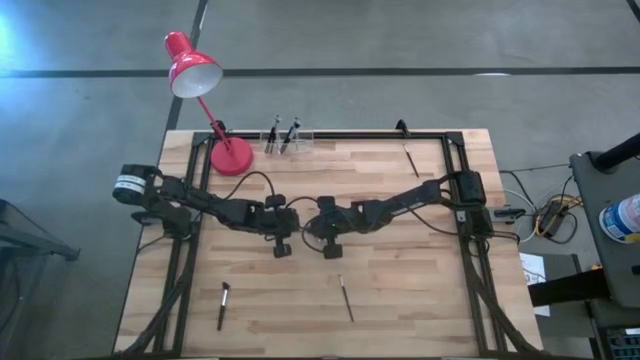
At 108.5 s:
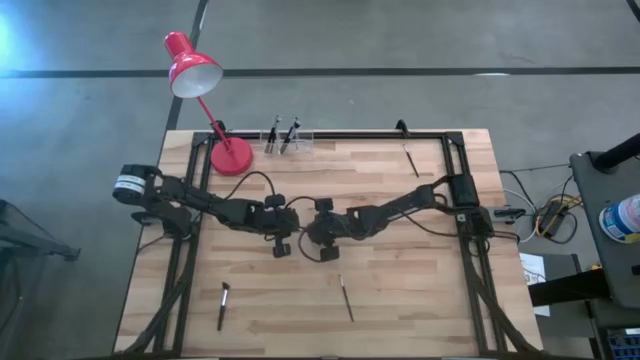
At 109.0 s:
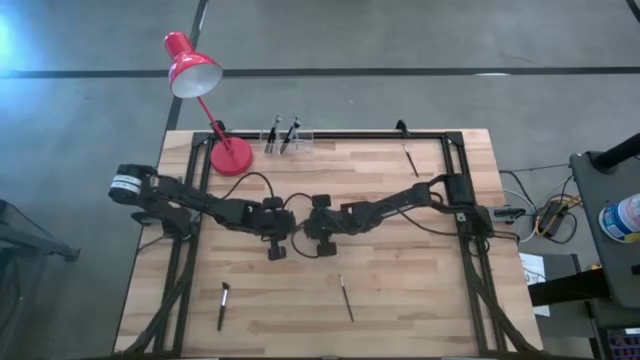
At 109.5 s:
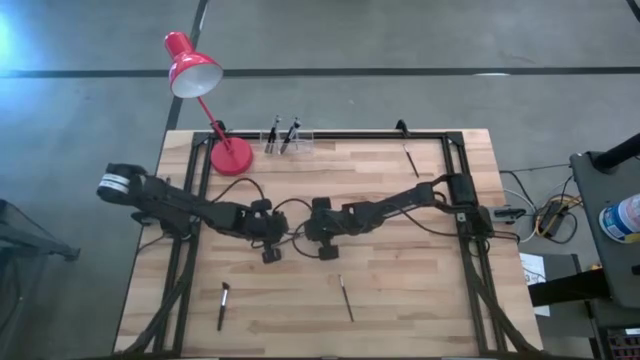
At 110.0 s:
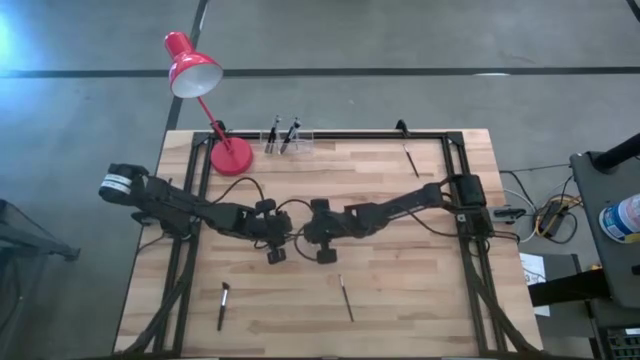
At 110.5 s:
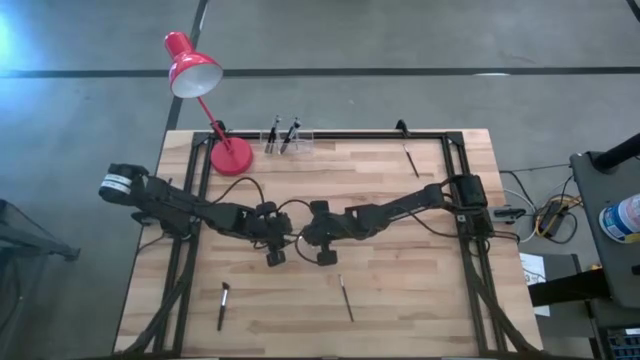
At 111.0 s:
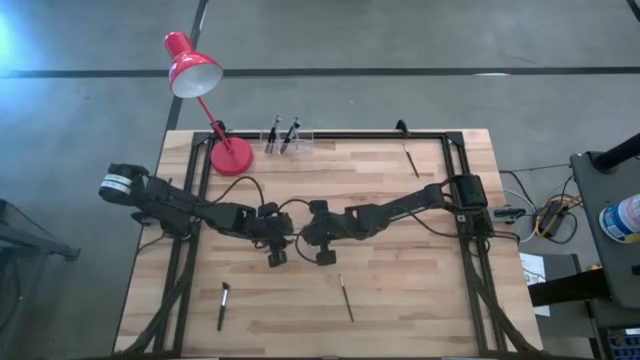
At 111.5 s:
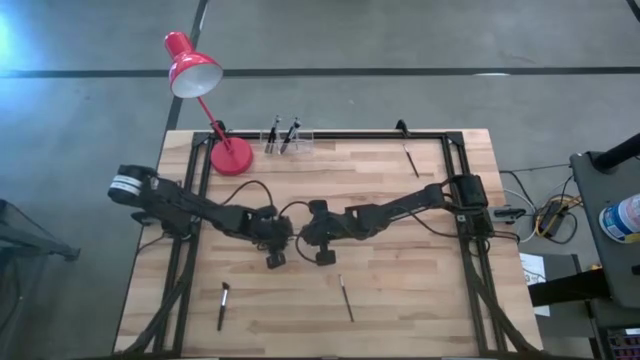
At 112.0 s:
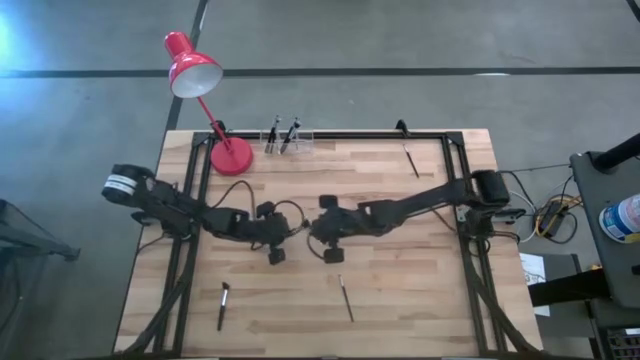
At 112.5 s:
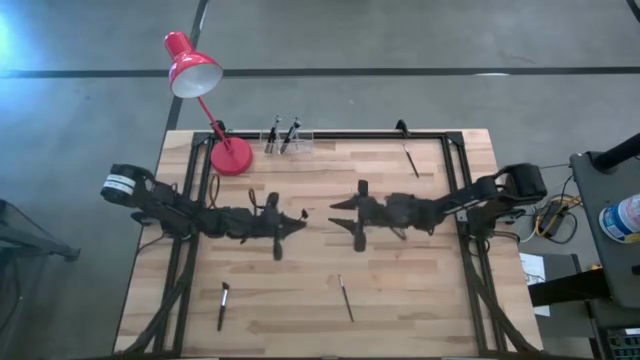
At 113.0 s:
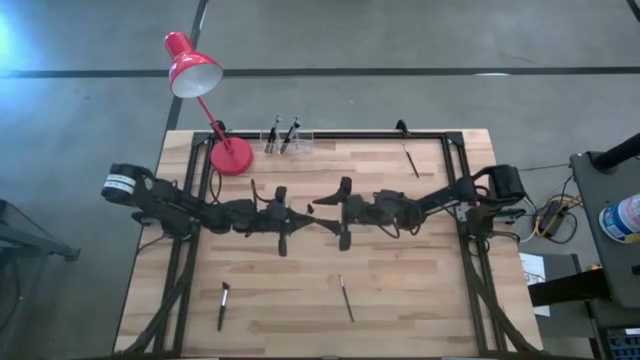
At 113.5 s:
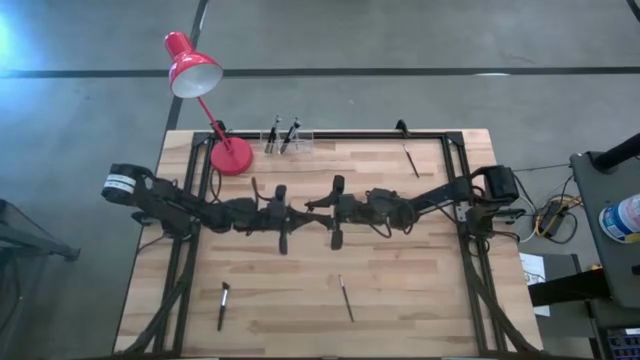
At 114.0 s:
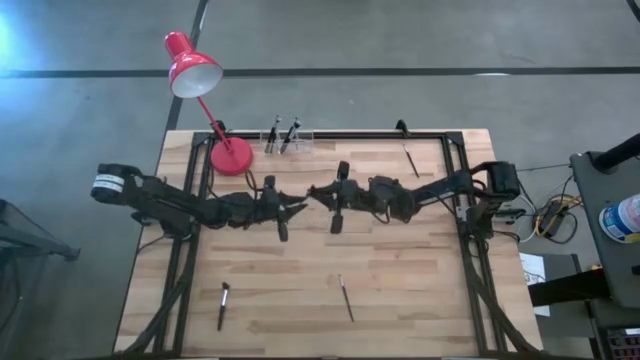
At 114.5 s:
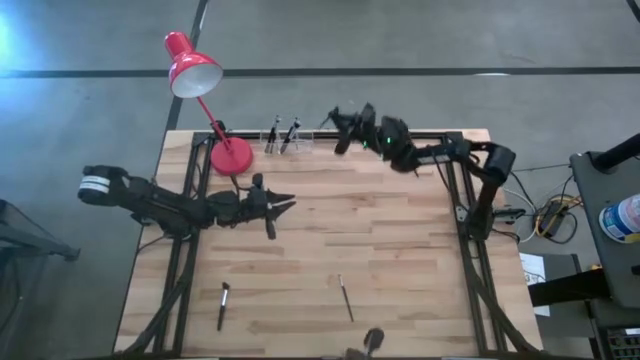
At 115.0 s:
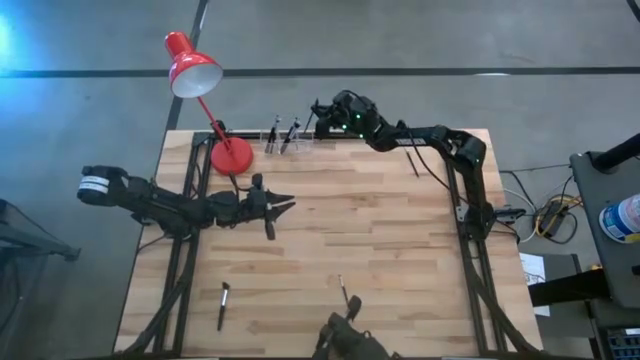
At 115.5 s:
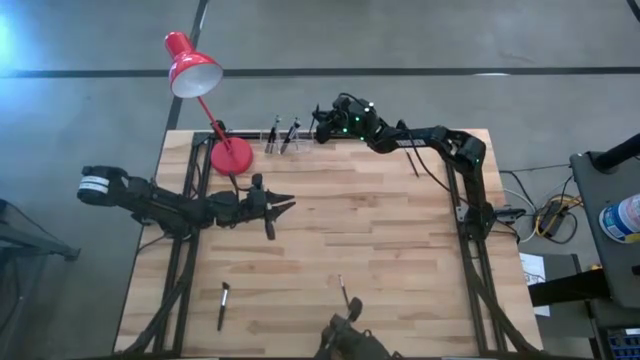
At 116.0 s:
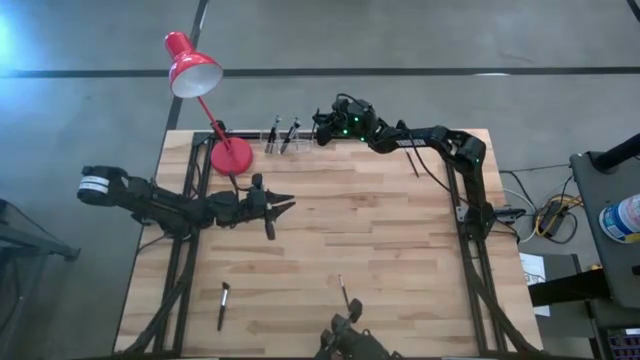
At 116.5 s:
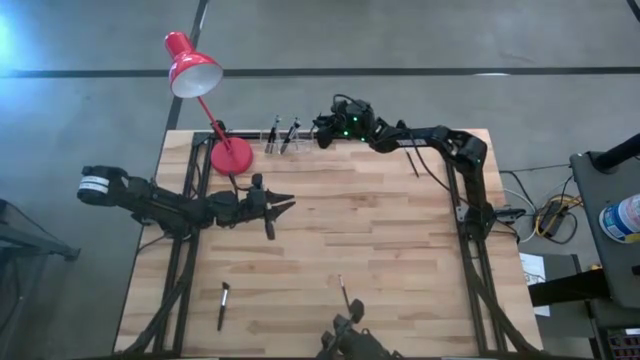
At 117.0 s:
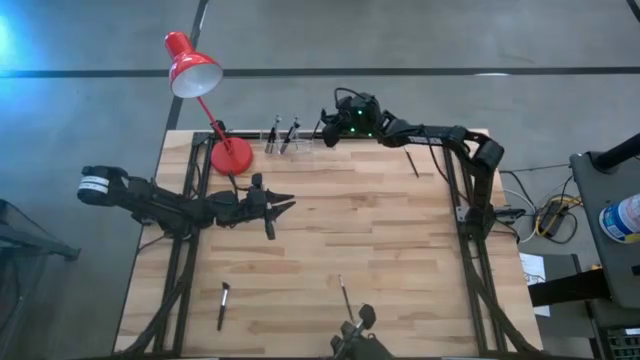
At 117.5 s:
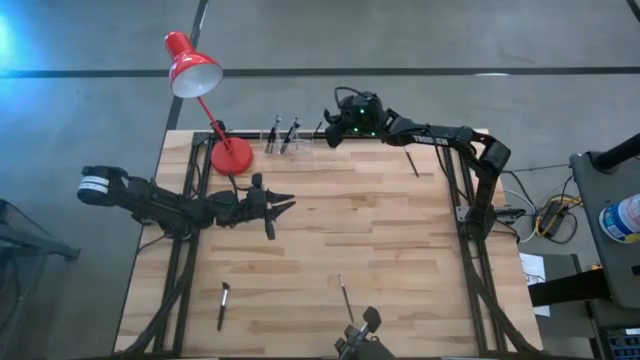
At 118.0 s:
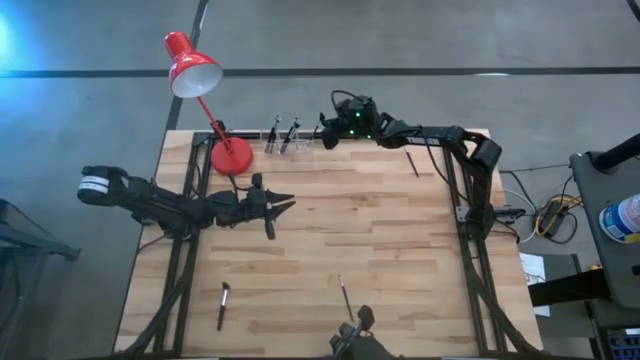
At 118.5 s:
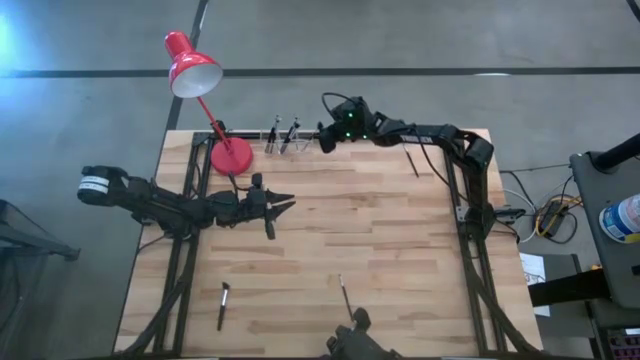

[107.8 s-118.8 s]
Task: Pick & Place Makeup Supplies
Put the makeup brush into the transparent organizer

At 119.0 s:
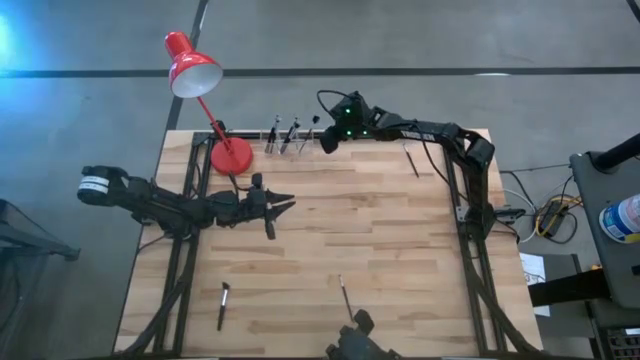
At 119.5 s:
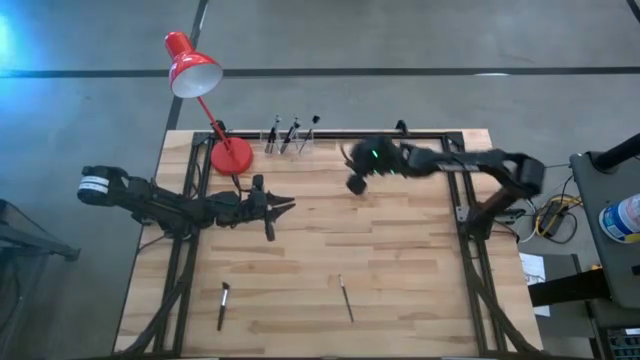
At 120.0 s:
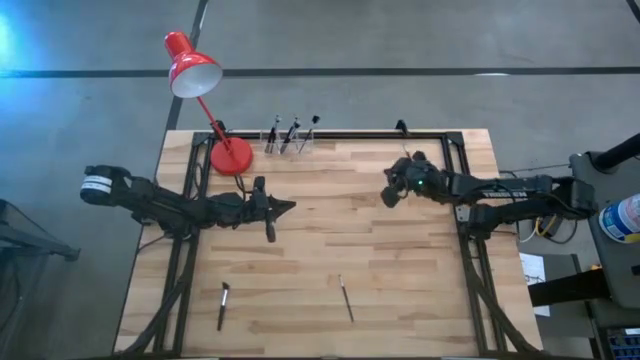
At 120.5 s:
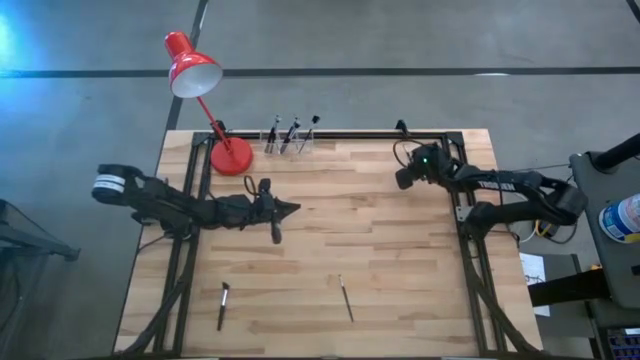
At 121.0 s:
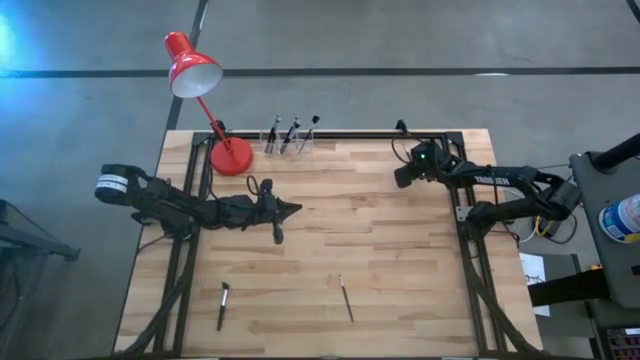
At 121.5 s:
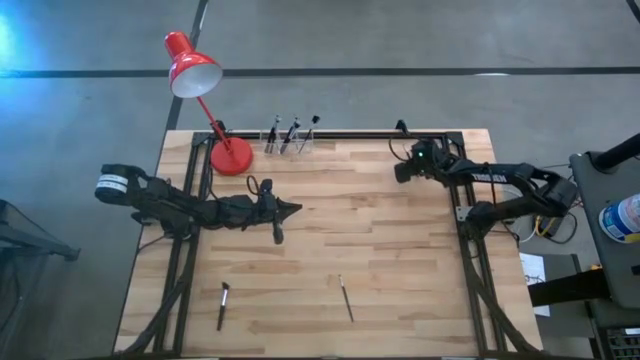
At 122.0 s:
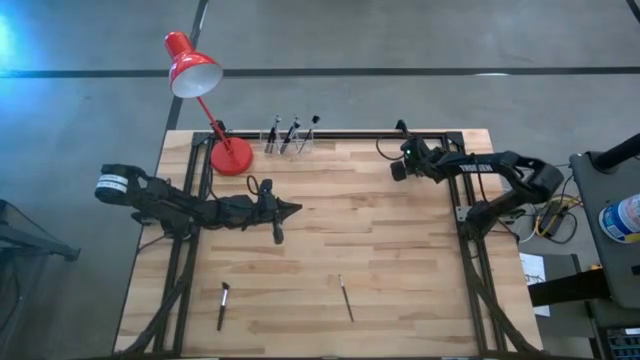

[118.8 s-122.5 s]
Put the makeup brush into the transparent organizer

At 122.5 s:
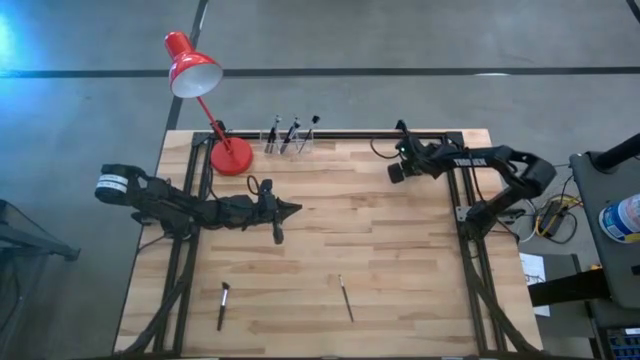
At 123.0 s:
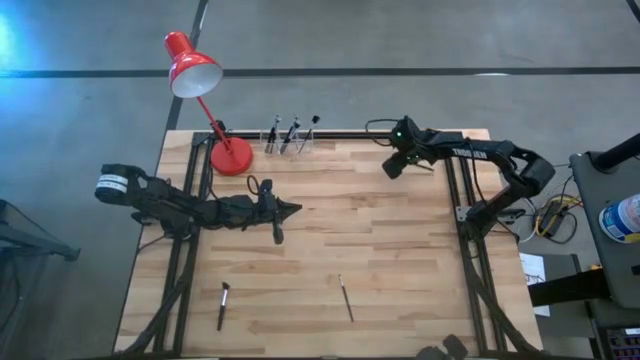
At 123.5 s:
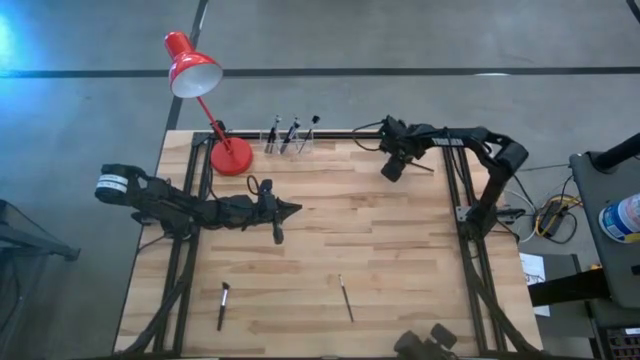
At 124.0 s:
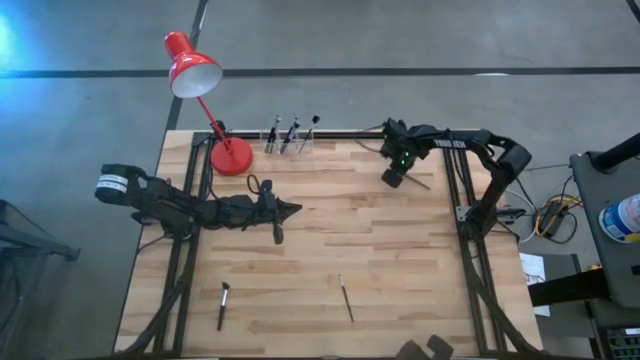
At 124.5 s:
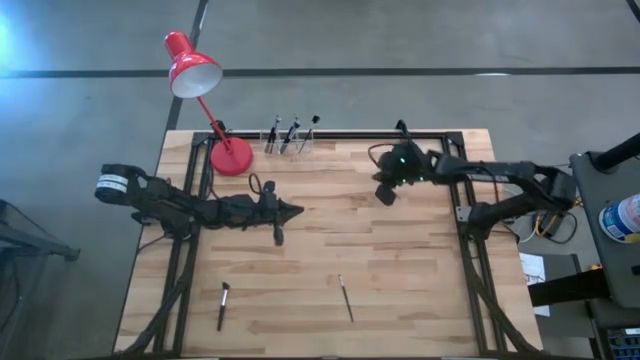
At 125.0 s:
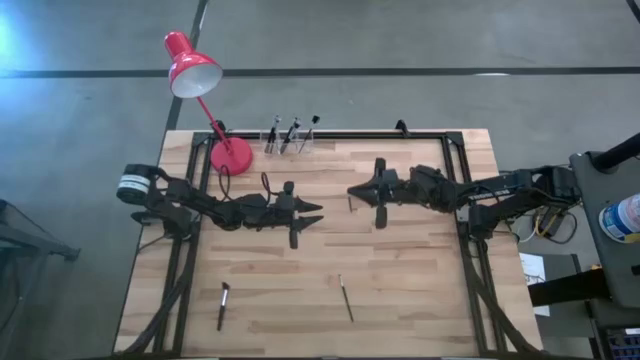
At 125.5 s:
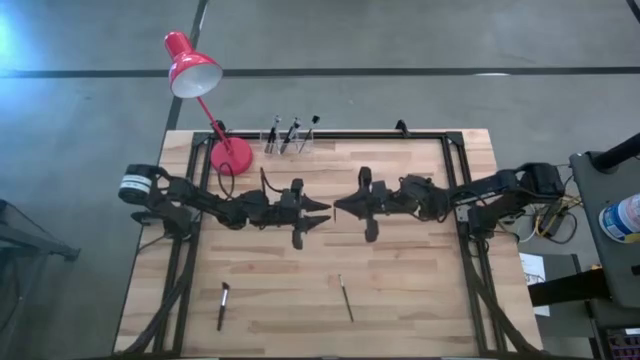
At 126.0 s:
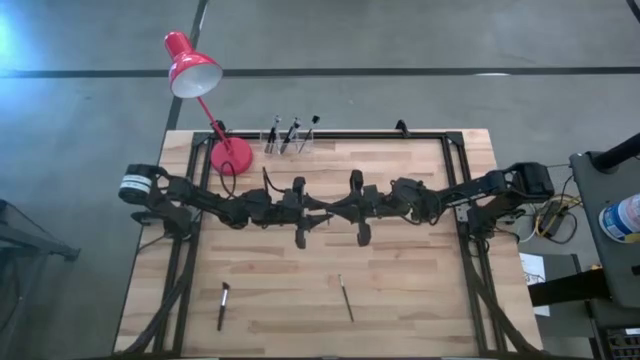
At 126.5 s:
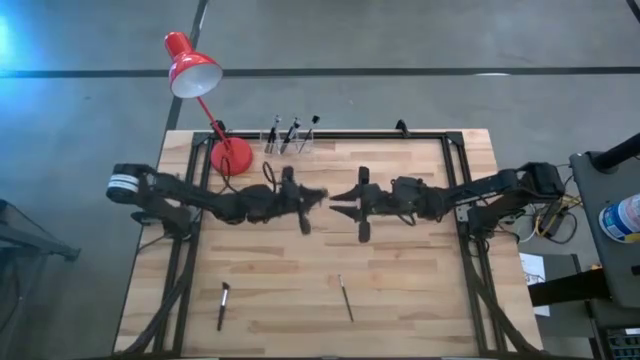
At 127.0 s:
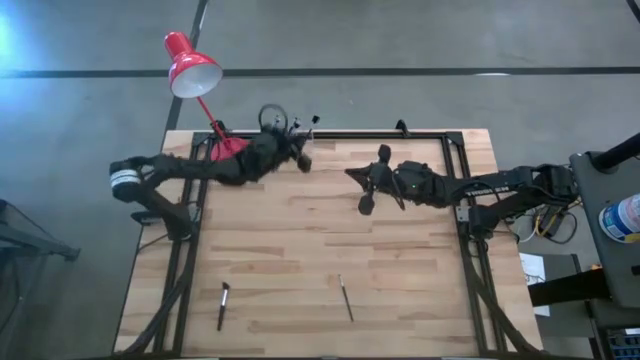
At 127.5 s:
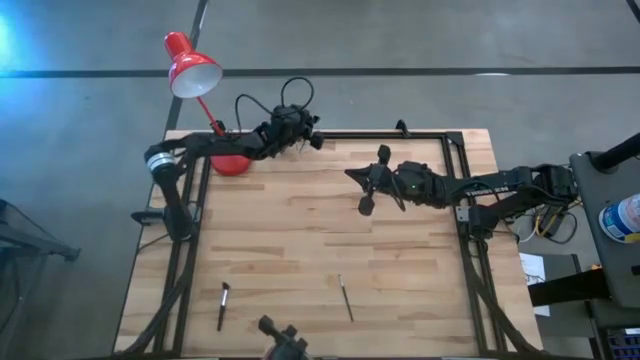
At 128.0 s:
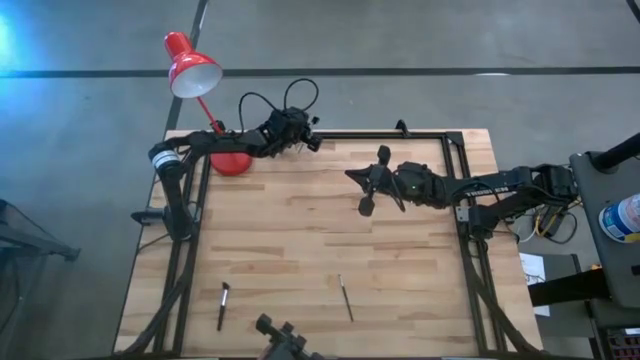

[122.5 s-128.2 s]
Put the makeup brush into the transparent organizer
